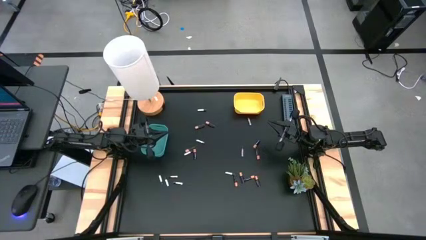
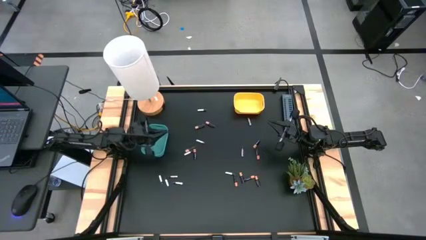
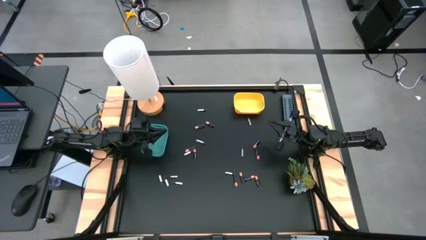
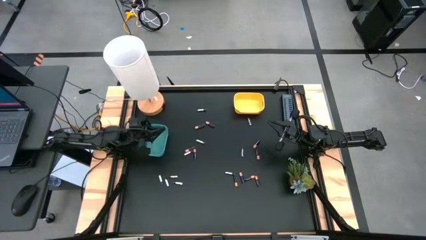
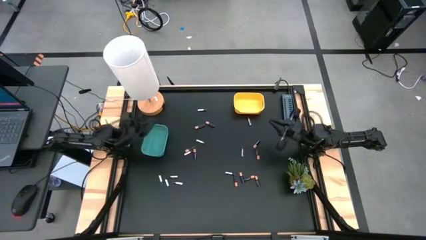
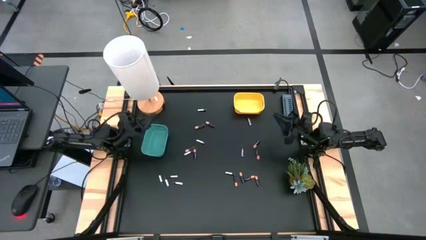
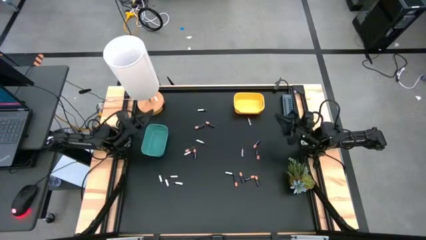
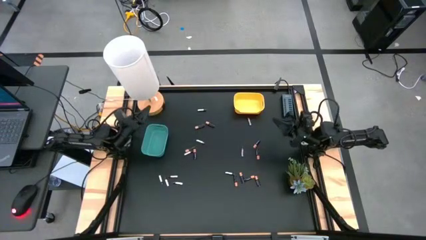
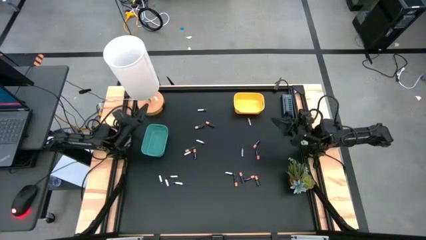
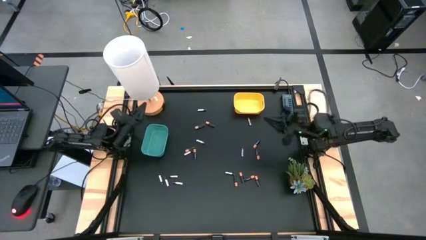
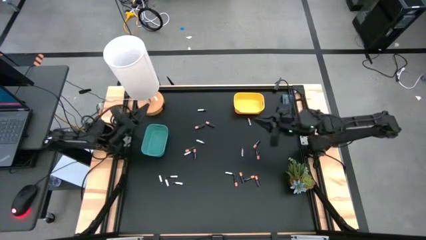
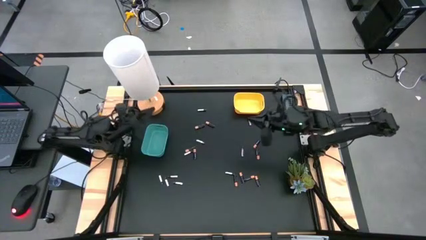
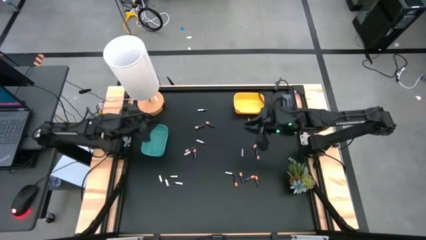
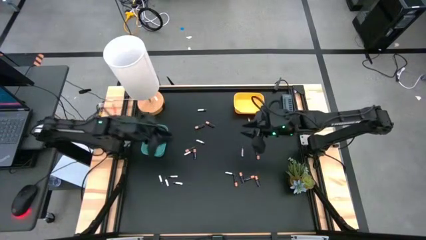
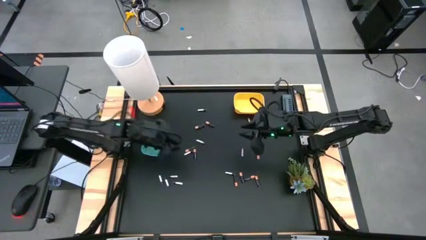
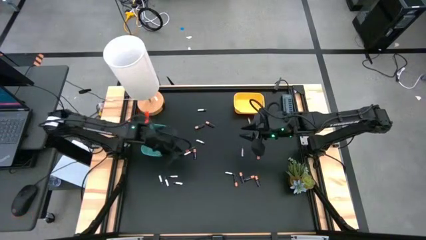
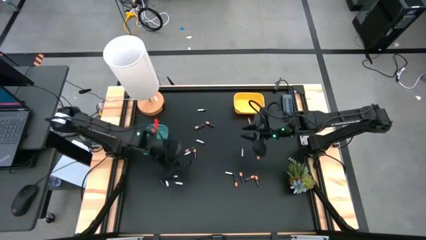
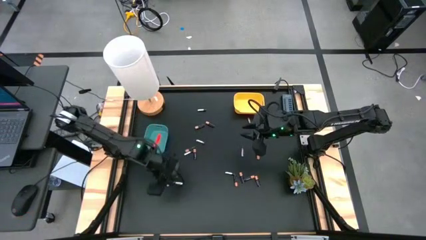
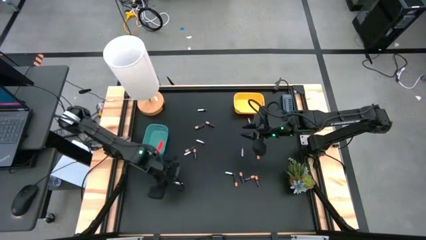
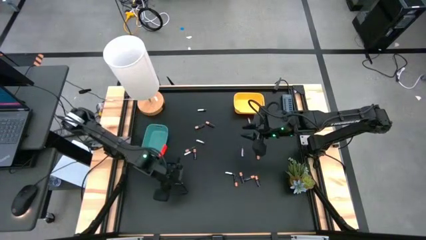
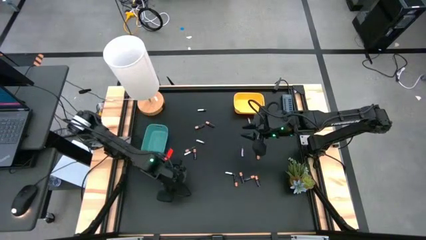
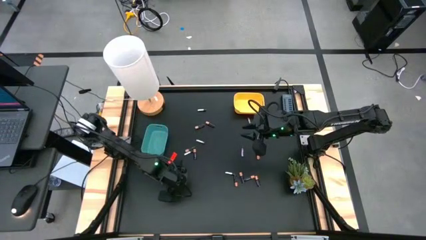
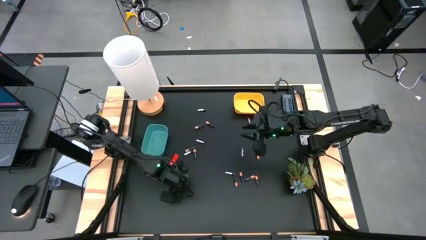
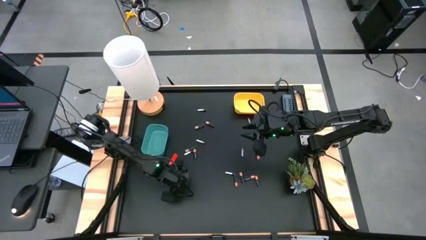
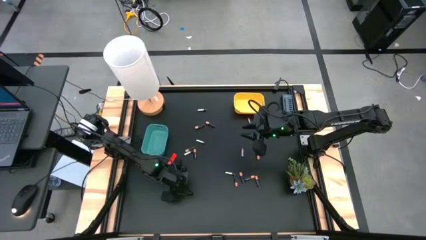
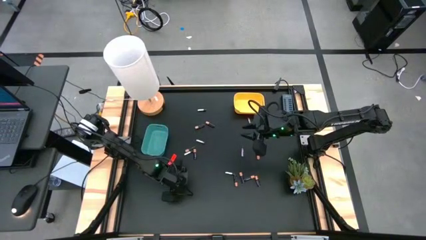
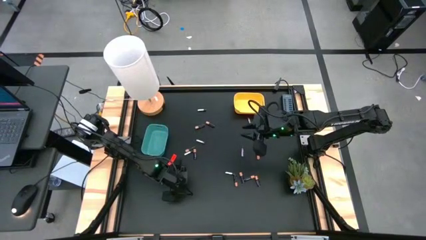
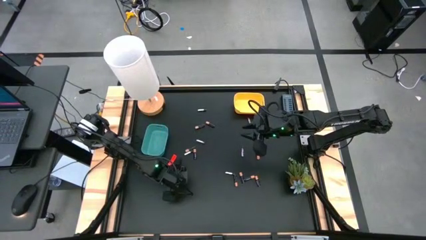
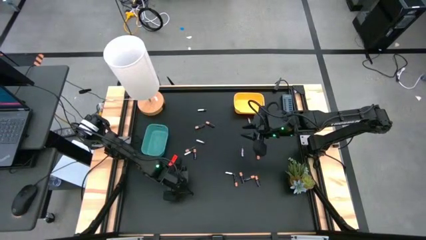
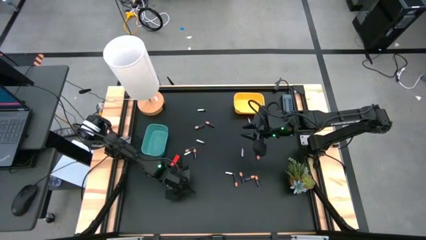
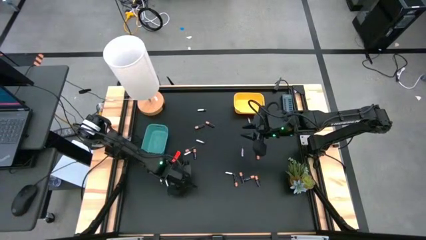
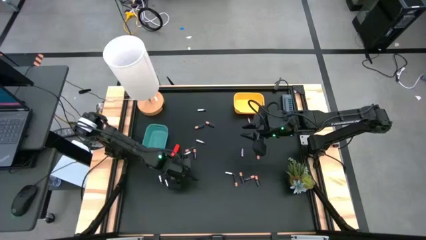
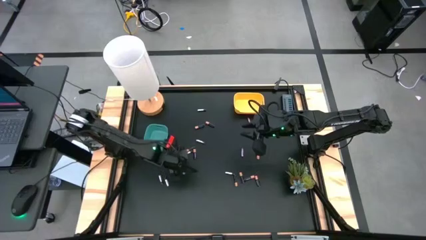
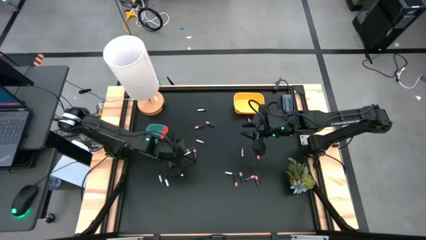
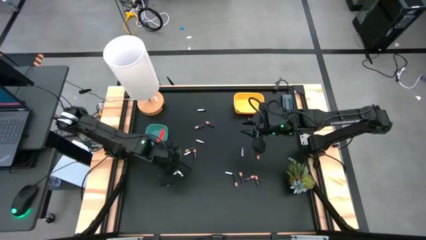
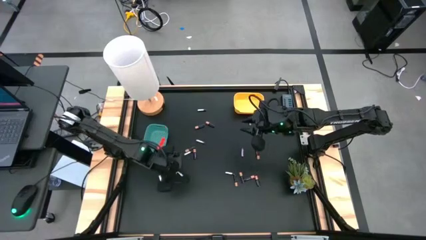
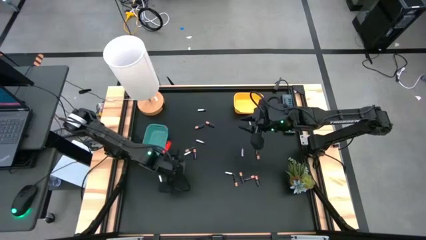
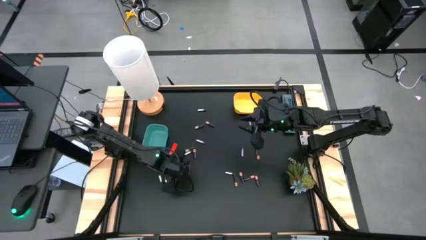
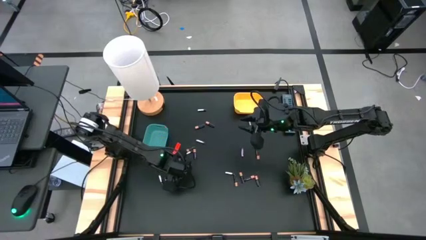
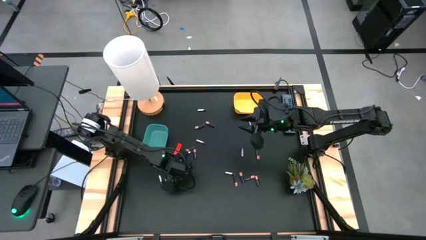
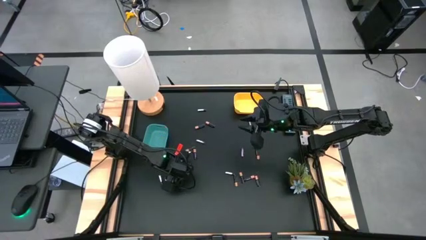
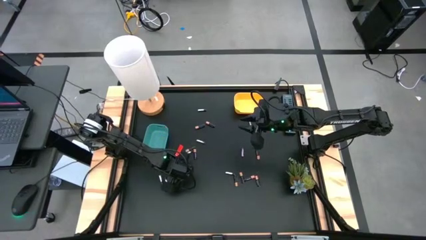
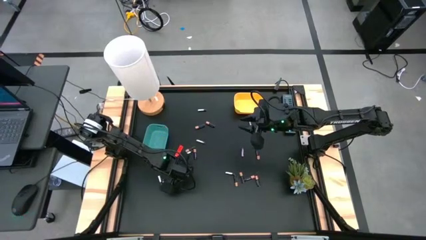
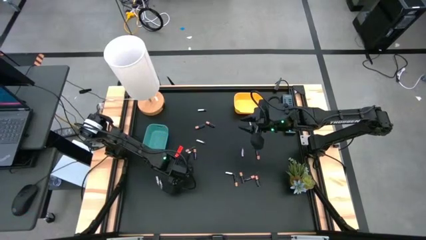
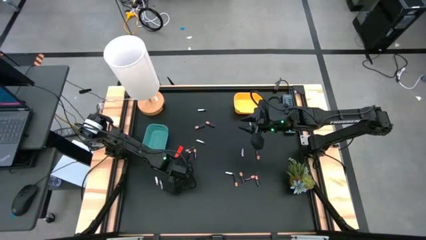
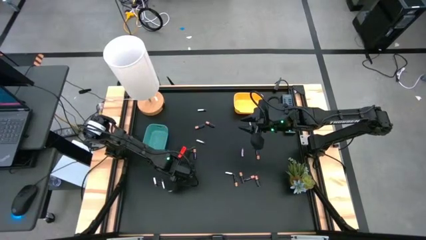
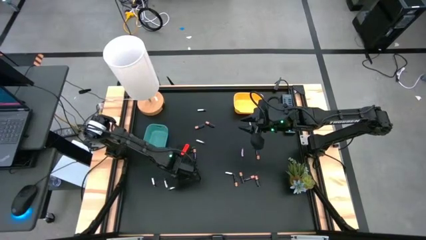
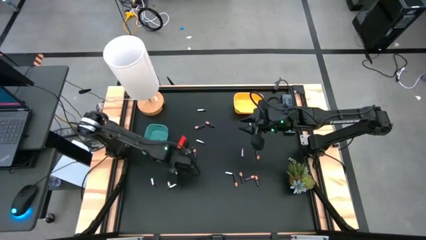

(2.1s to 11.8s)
Task: Sort batteries
Put the silver battery into the green bin

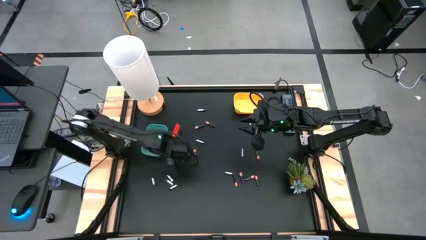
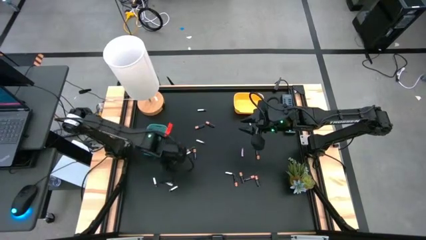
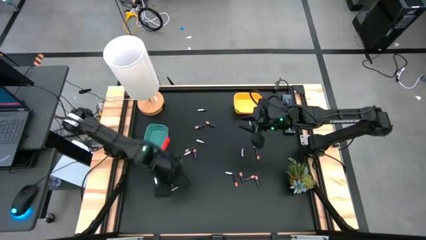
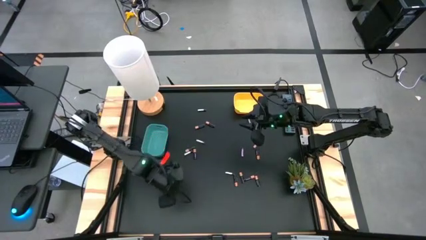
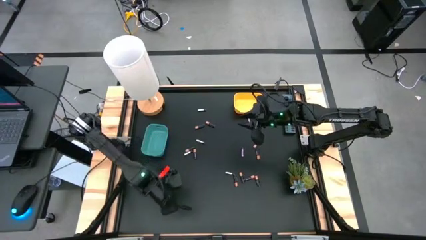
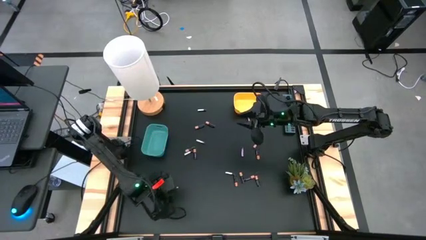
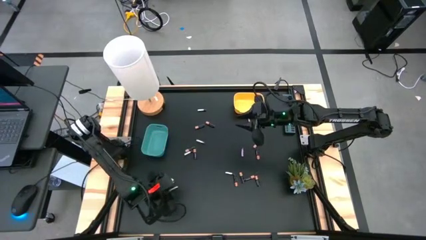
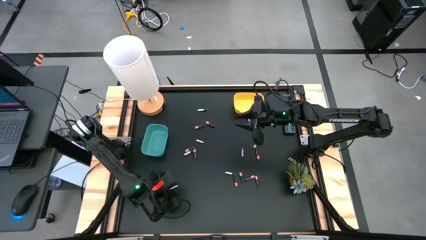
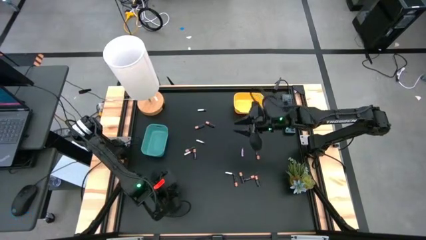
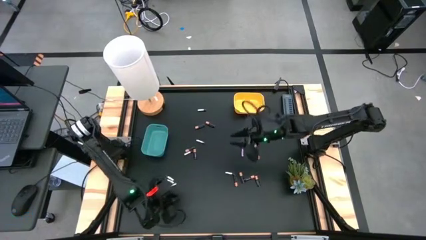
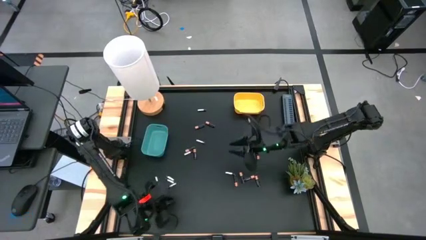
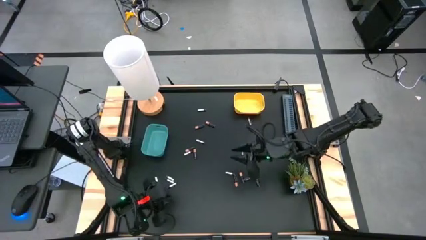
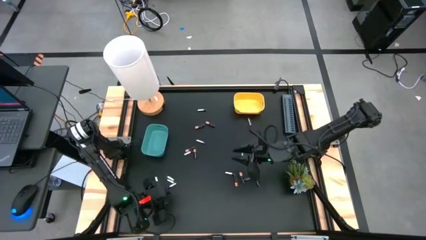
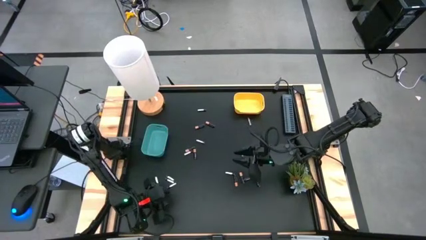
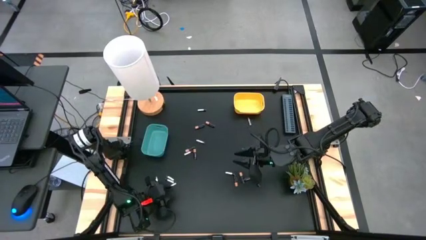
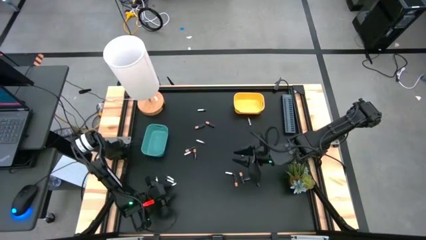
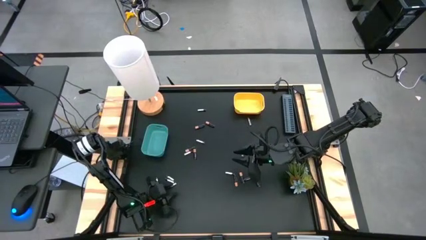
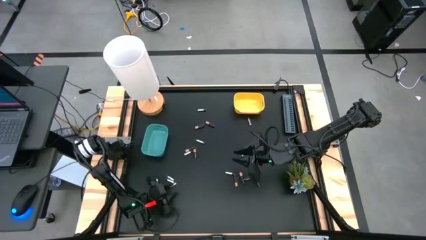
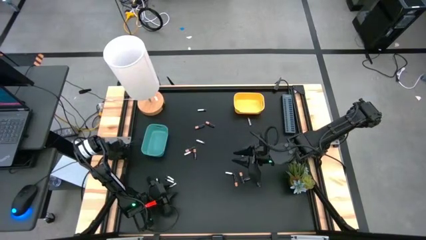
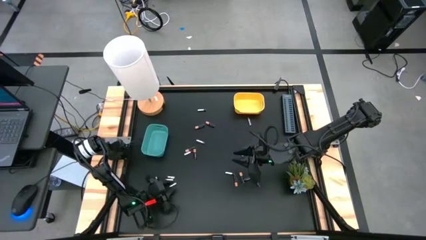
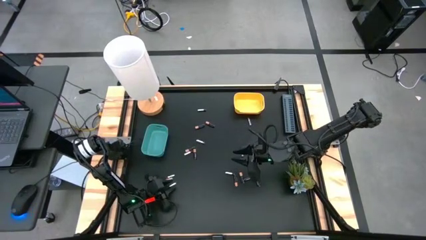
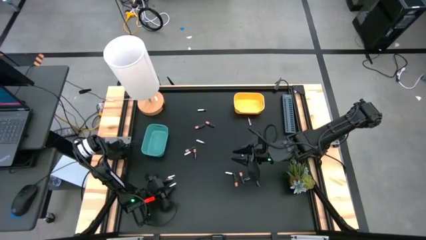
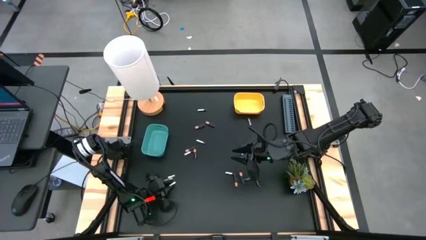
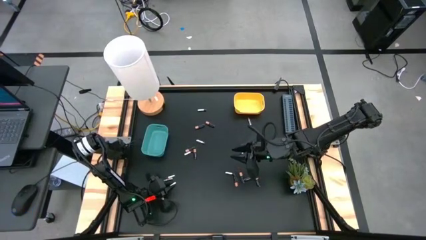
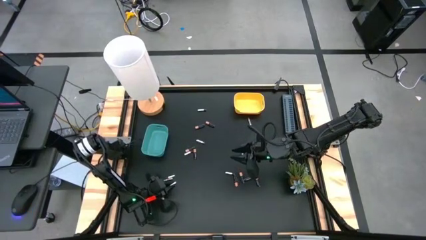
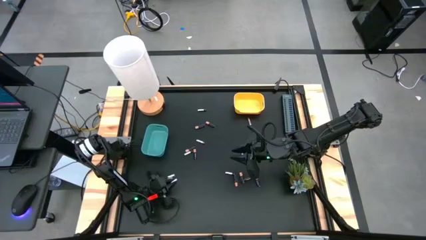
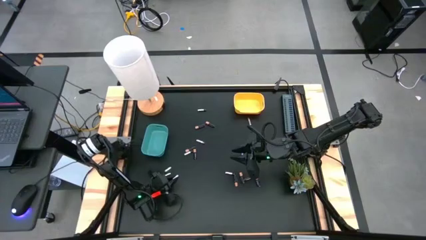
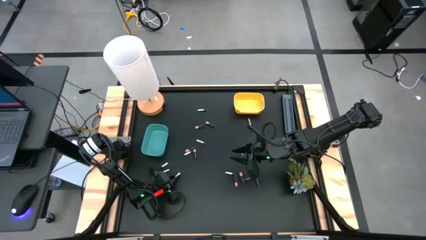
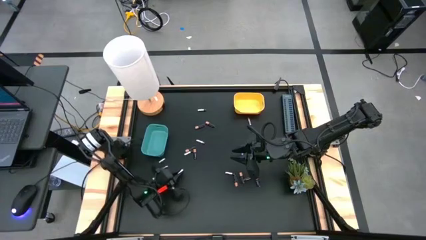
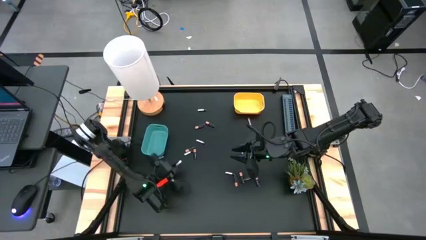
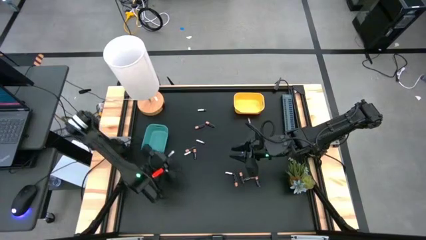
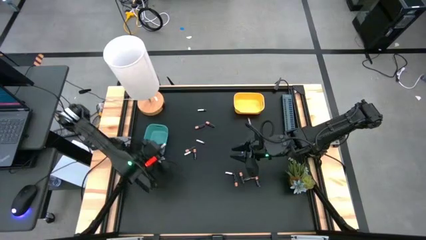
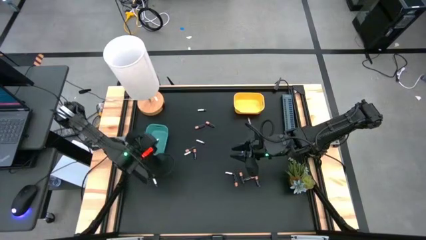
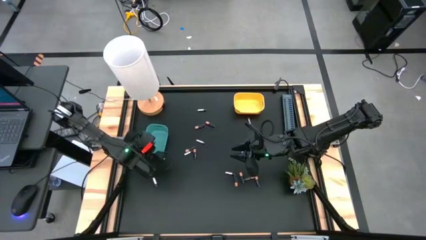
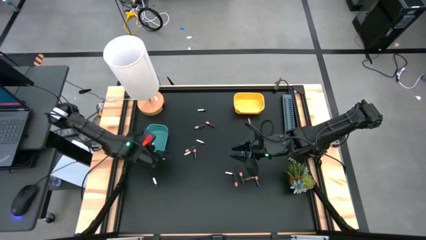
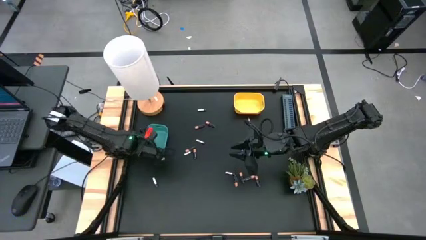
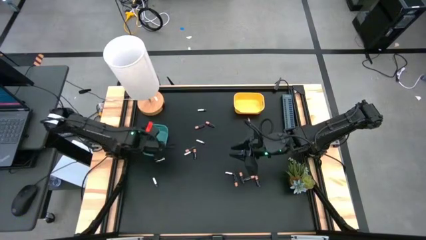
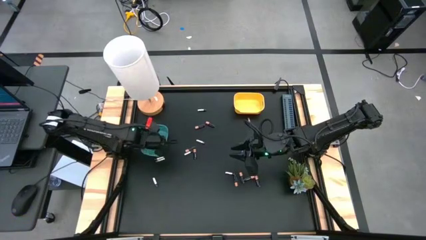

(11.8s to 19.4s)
Put the silver battery into the green bin

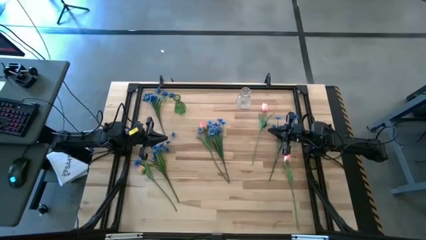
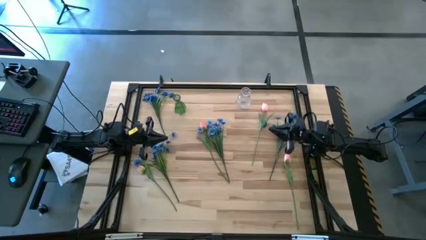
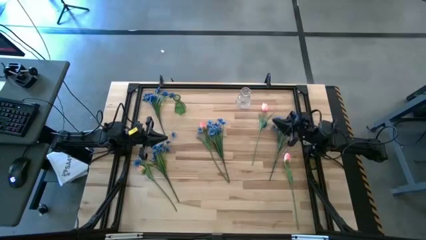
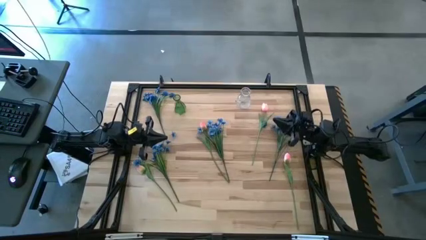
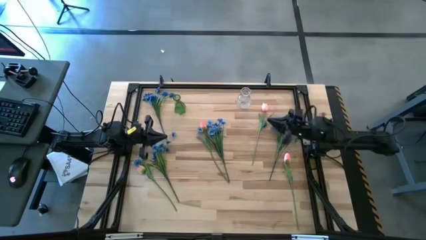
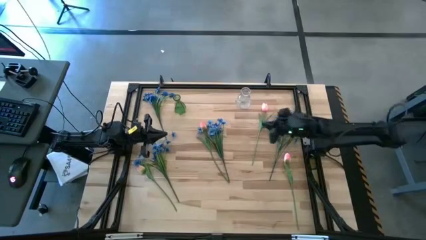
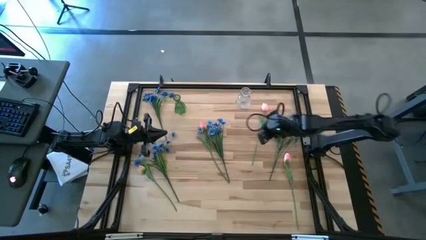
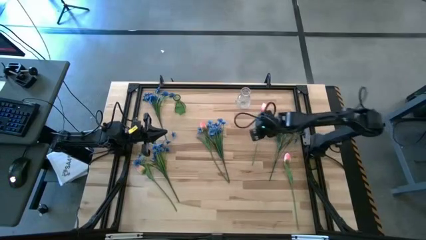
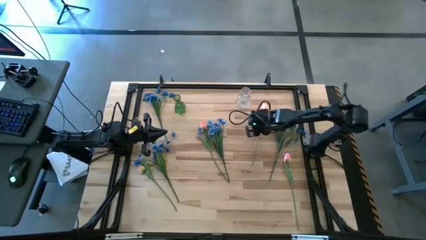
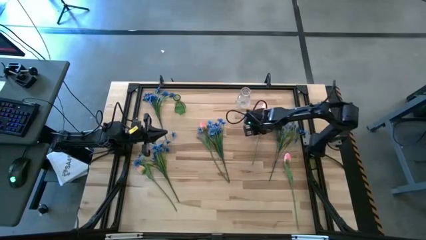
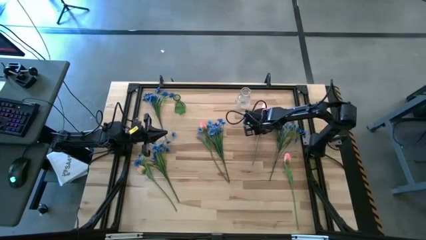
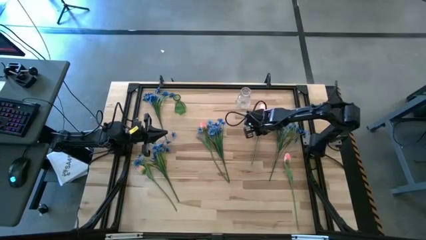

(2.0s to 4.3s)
Task: Sort flowers into vase by color
Put the top right pink tulip into the transparent vase
